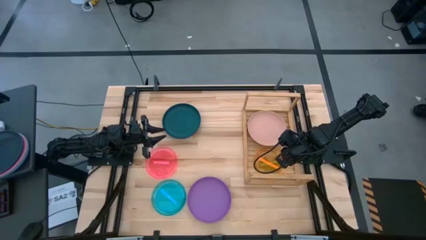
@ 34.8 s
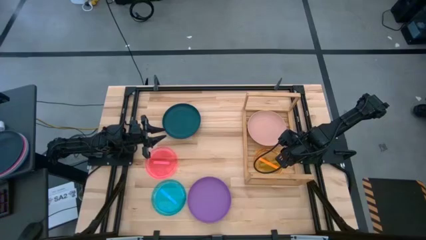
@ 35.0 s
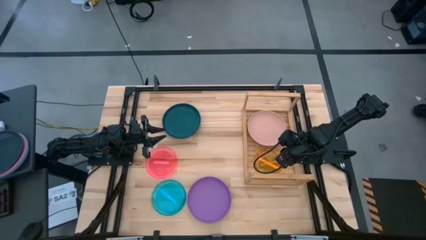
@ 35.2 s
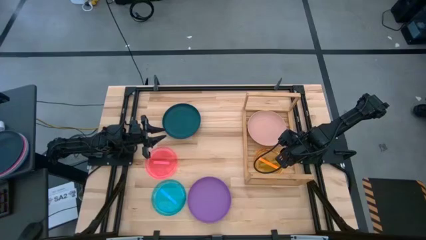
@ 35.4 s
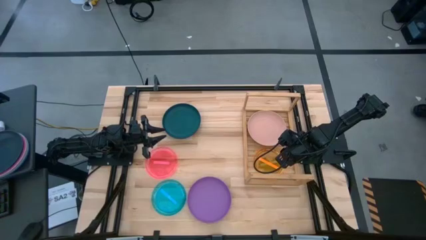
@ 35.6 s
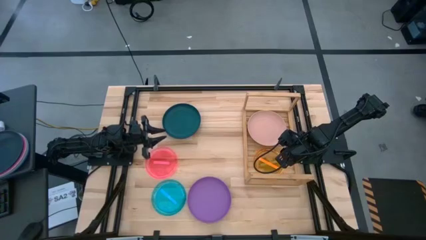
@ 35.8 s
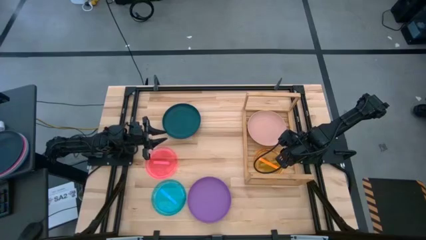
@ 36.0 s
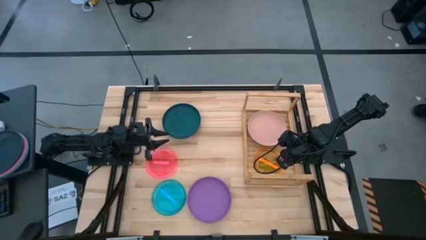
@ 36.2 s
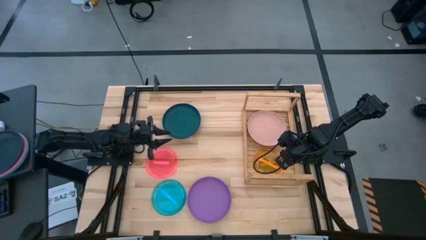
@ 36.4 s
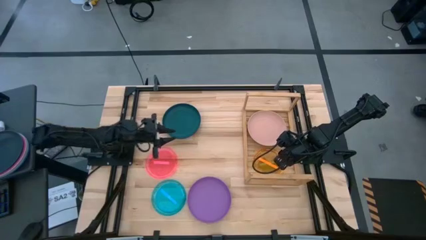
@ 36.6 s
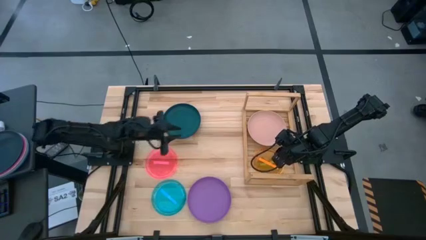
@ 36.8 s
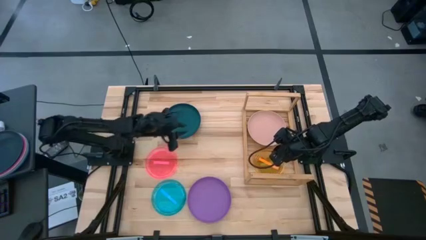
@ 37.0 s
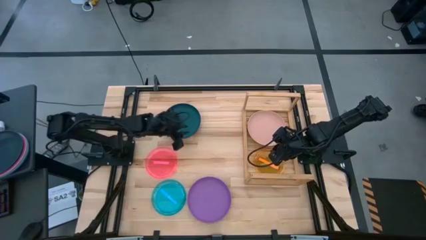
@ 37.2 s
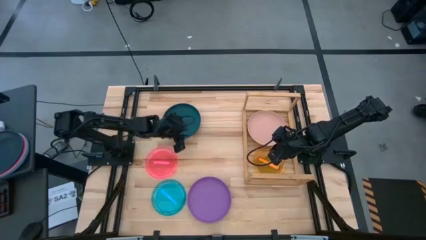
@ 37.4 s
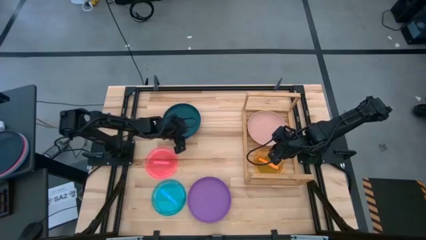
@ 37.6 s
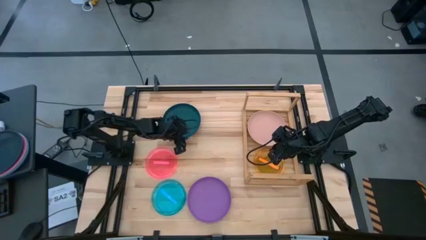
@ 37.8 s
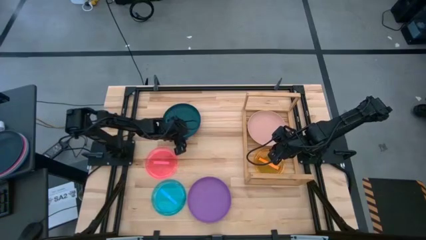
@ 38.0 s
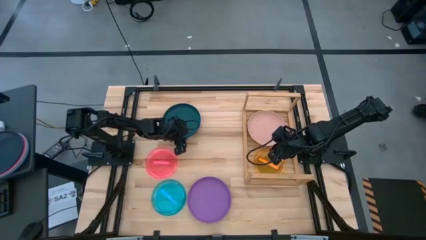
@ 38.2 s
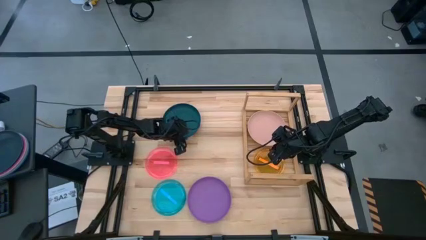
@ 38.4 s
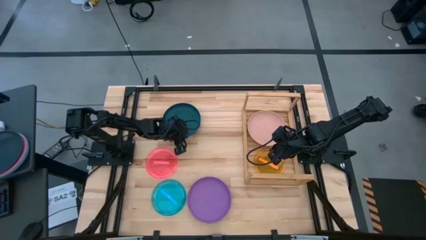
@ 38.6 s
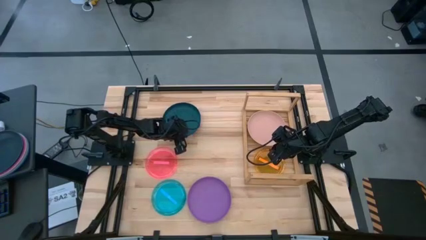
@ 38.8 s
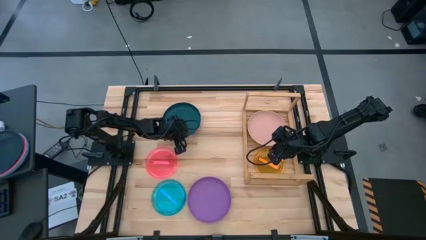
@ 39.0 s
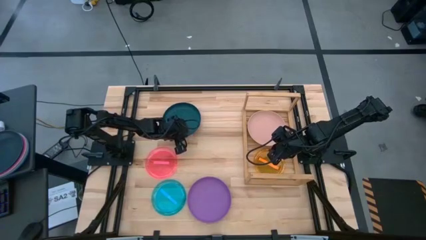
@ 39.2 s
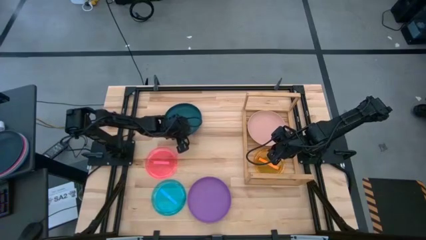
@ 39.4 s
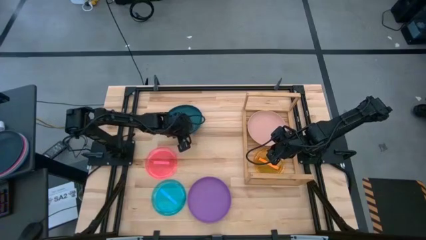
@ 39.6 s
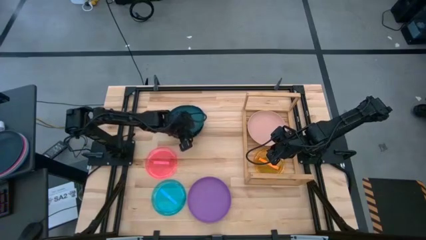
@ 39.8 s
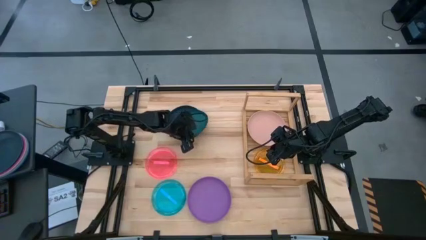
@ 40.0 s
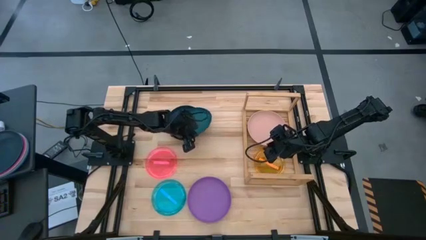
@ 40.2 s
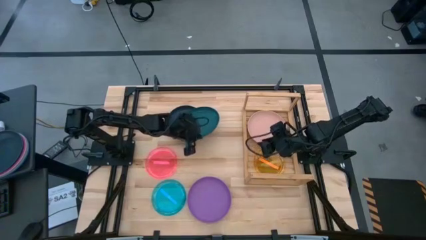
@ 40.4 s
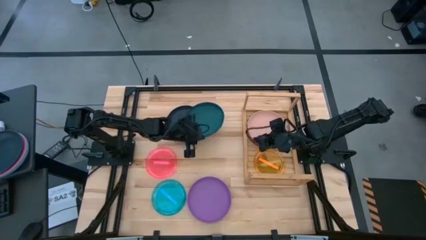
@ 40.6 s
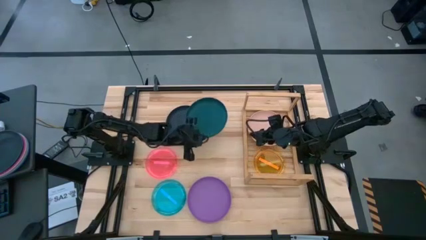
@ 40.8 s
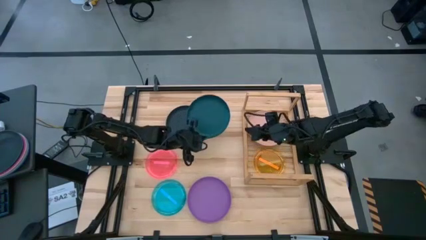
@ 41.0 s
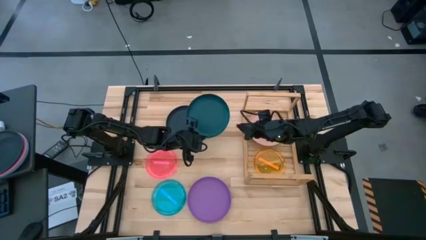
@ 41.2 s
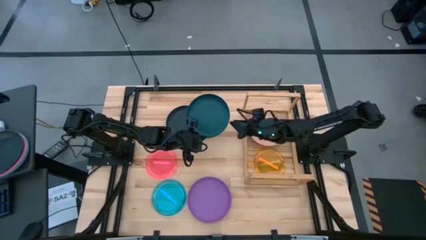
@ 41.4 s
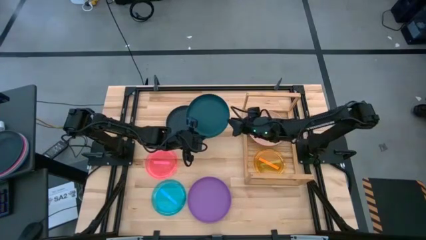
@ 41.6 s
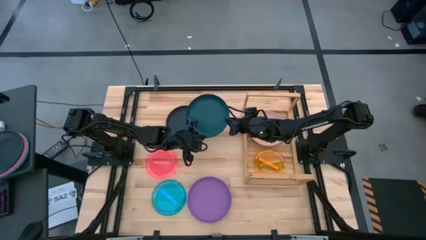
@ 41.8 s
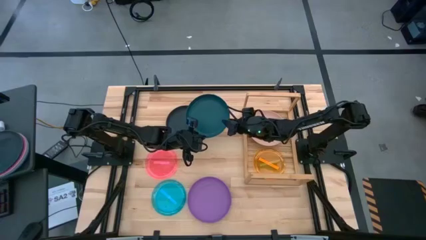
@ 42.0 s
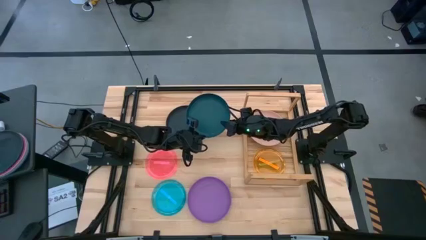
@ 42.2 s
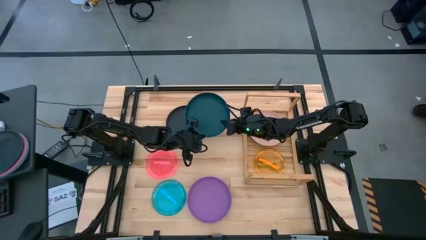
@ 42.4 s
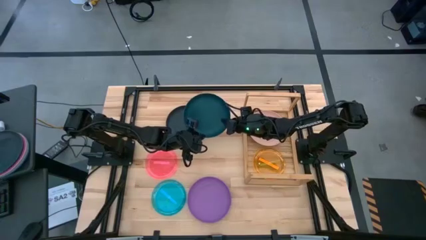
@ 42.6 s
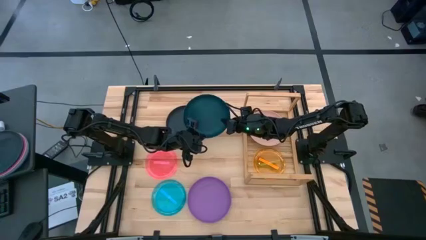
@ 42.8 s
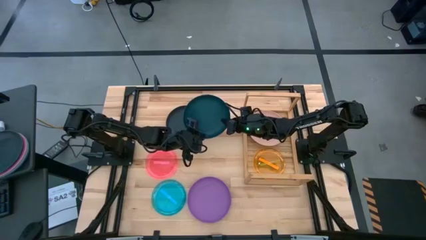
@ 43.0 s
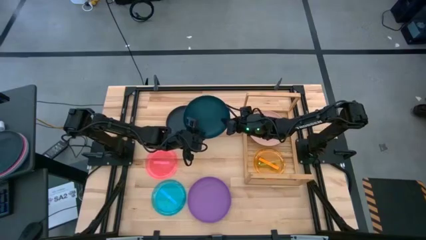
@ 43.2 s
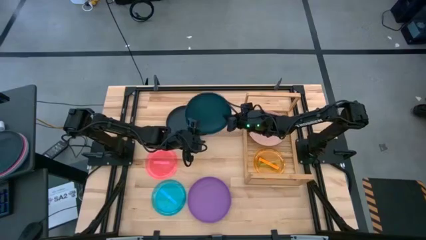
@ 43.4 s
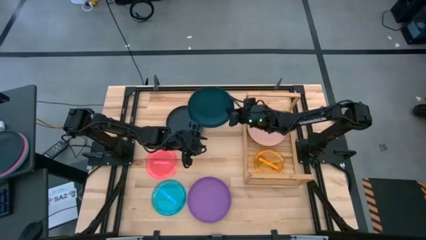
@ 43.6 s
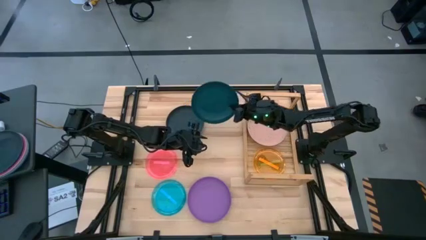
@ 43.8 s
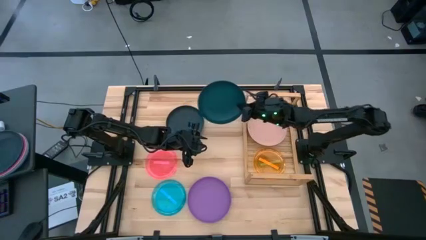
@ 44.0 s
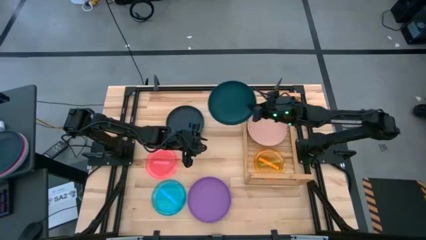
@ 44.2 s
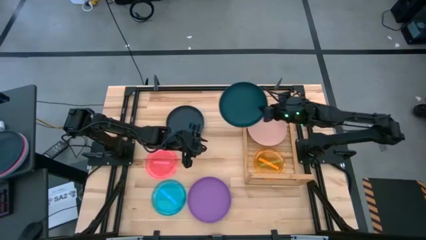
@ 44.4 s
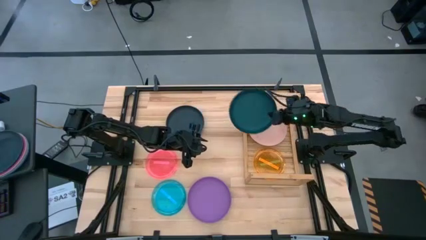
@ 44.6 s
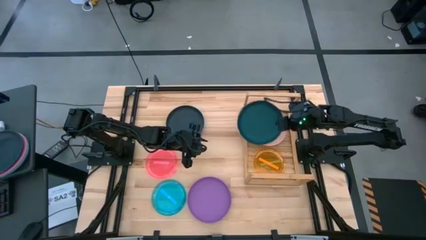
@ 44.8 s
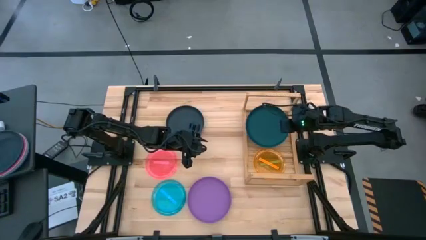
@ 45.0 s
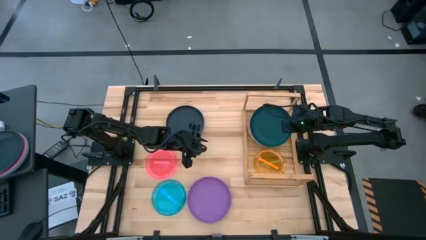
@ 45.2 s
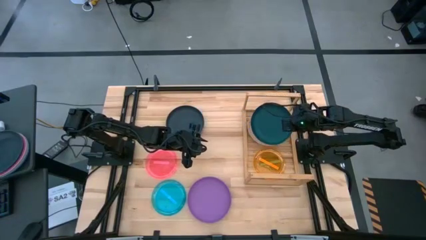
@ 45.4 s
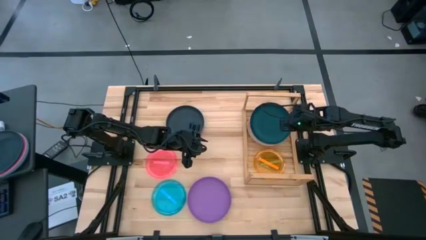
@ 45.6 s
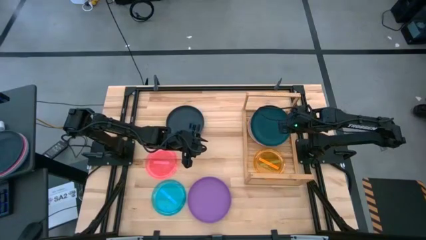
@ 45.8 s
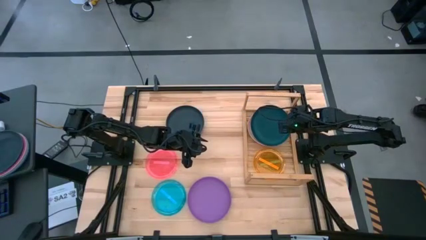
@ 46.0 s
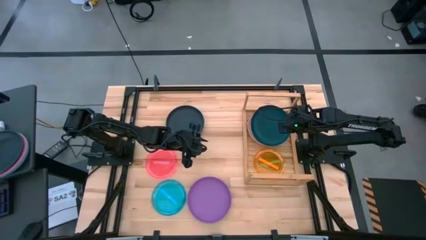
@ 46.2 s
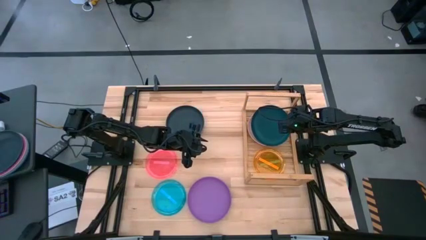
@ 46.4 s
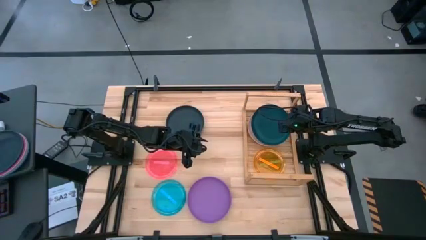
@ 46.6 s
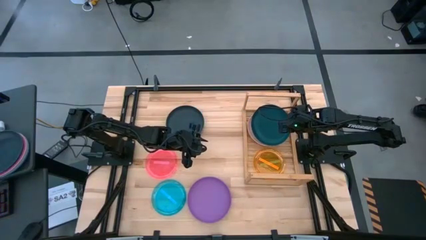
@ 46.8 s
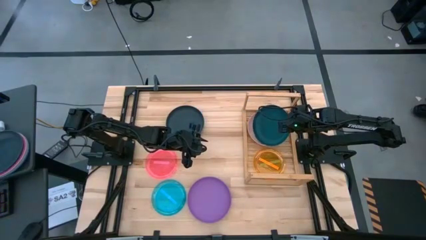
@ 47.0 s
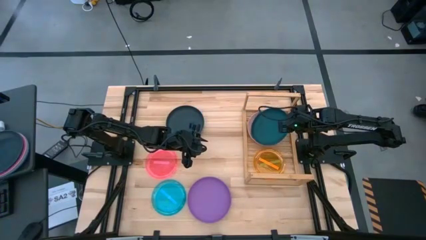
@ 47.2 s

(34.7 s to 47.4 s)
Task: Place and stack plates onto a shelf
Stack the blue plate on top of the brown plate on the shelf
